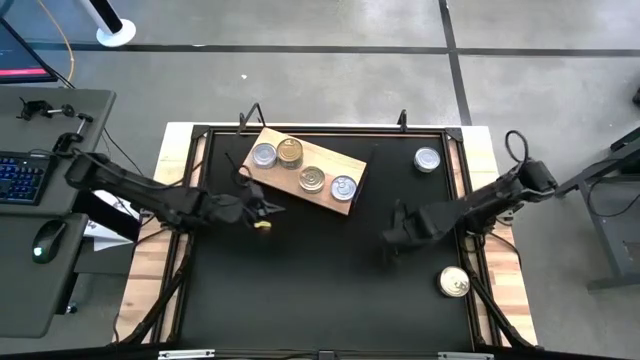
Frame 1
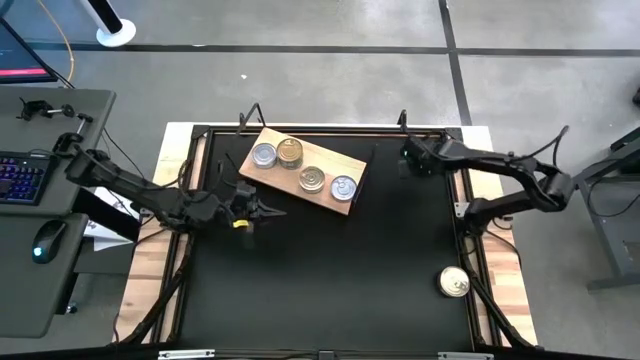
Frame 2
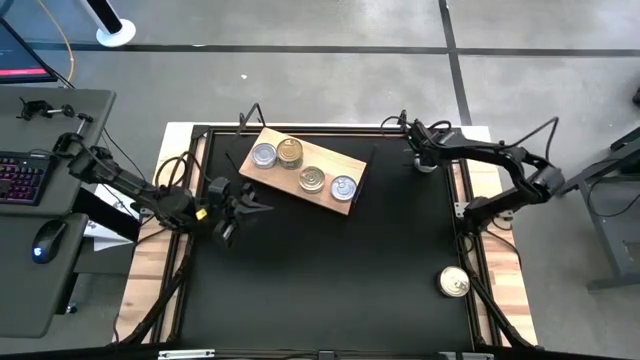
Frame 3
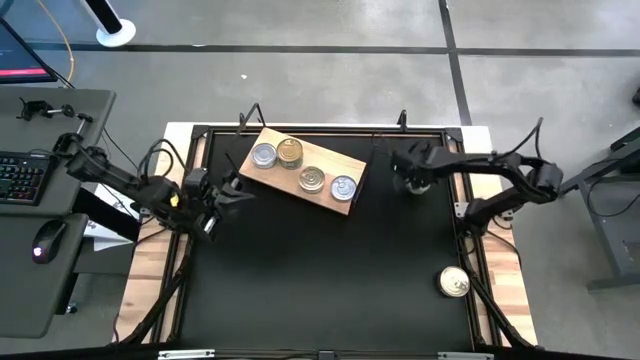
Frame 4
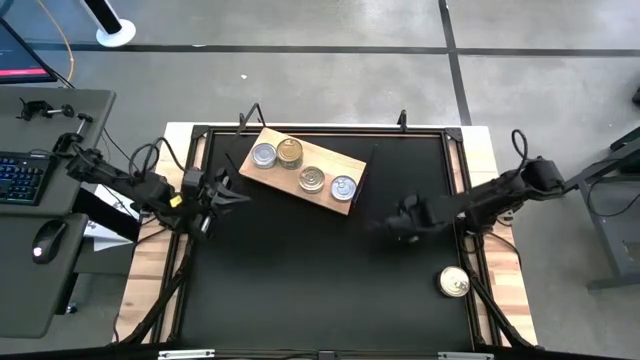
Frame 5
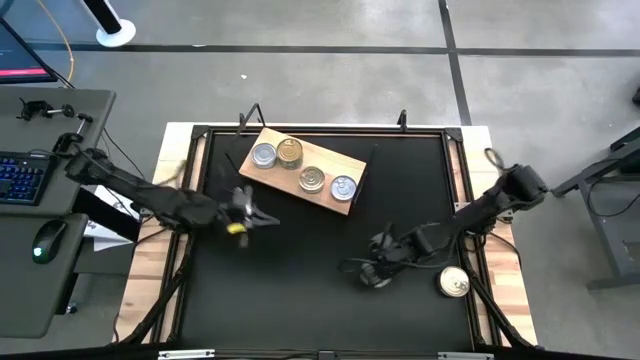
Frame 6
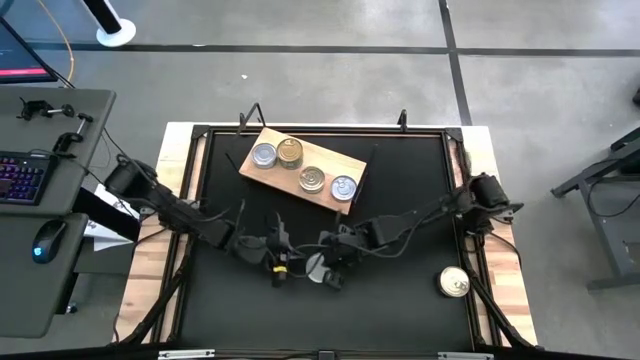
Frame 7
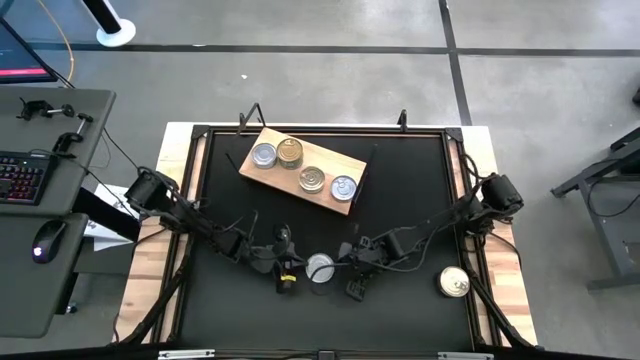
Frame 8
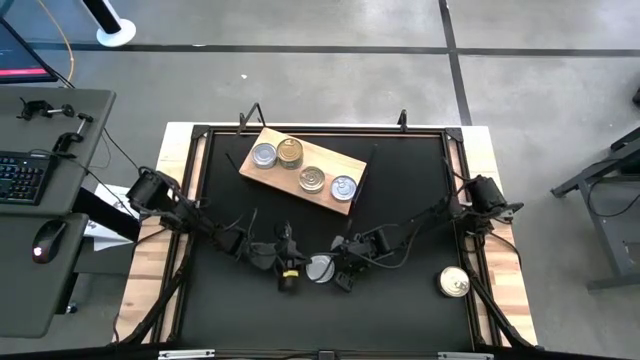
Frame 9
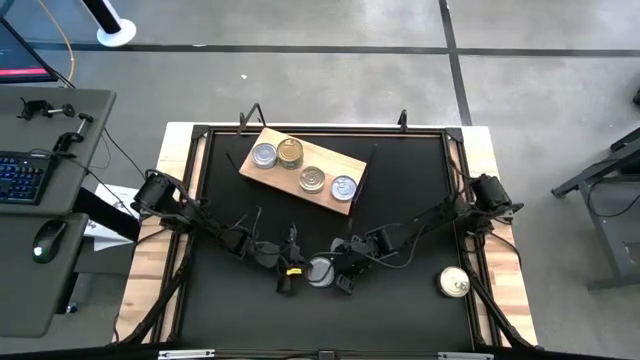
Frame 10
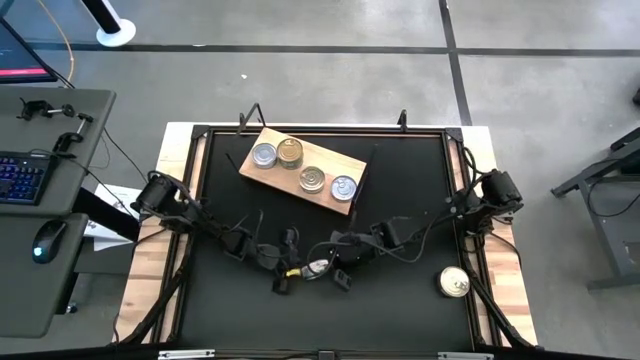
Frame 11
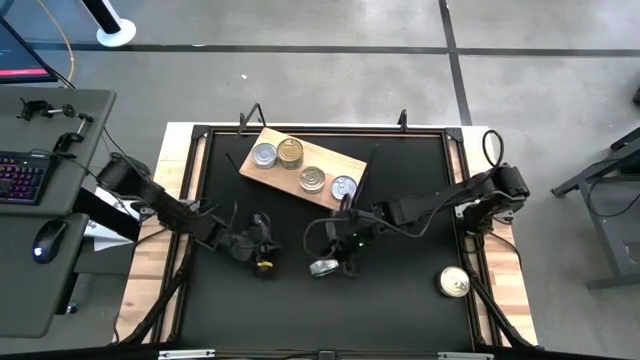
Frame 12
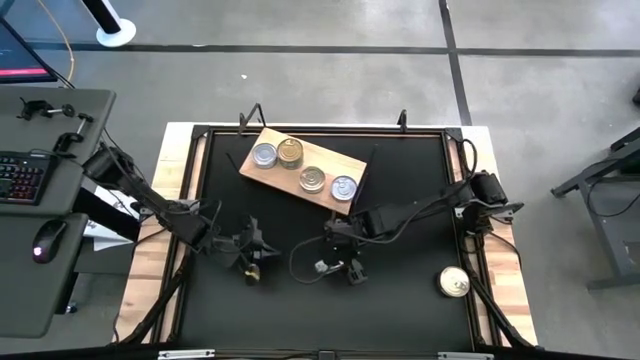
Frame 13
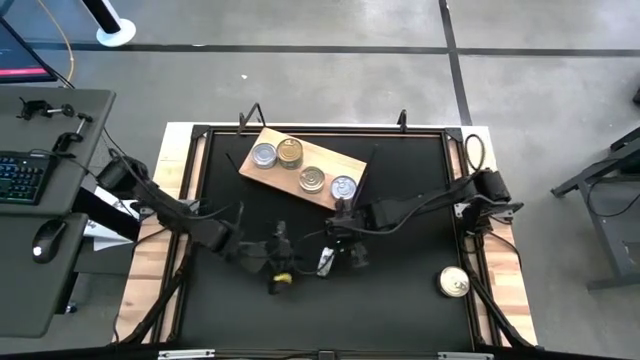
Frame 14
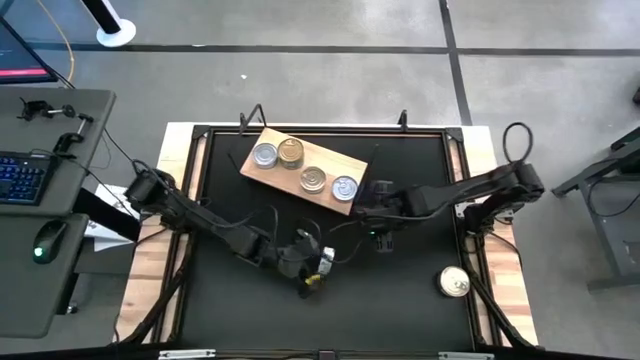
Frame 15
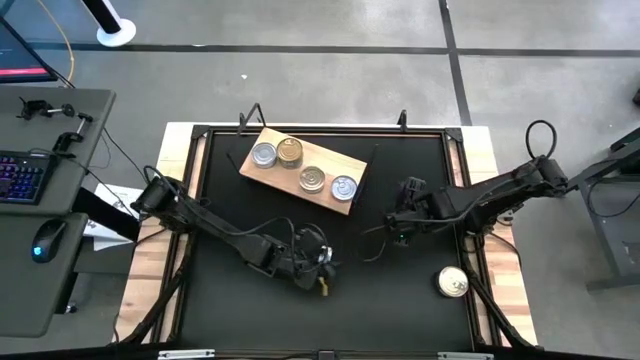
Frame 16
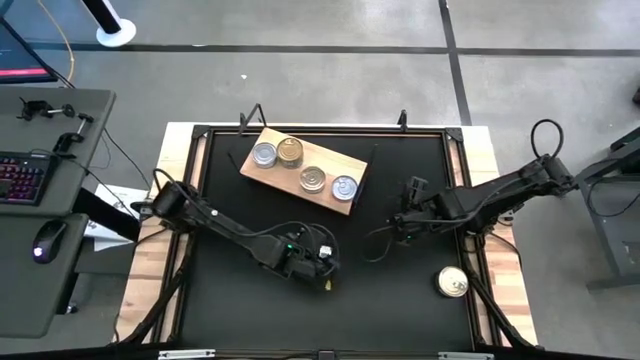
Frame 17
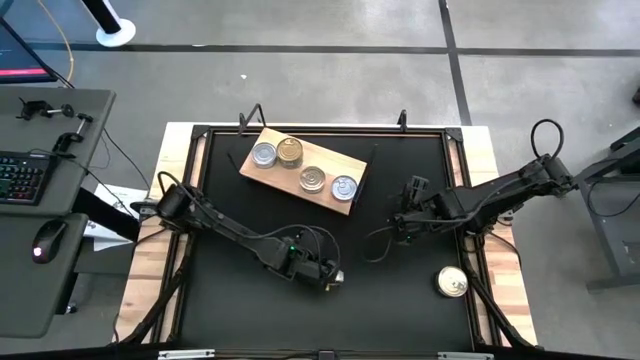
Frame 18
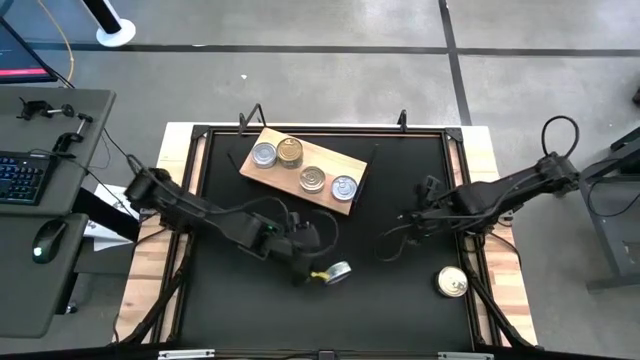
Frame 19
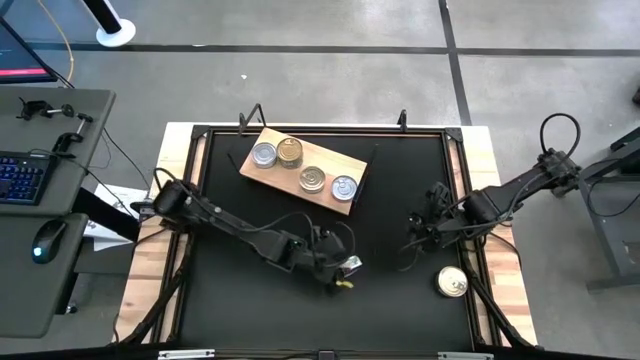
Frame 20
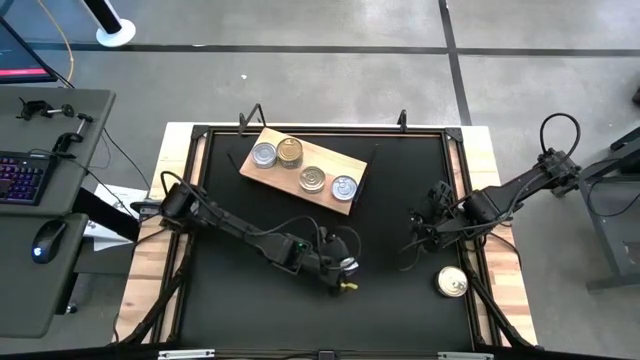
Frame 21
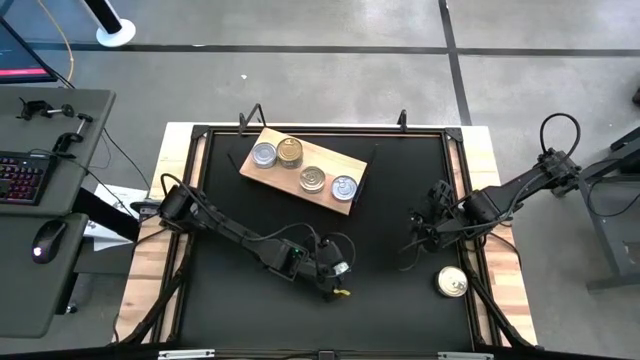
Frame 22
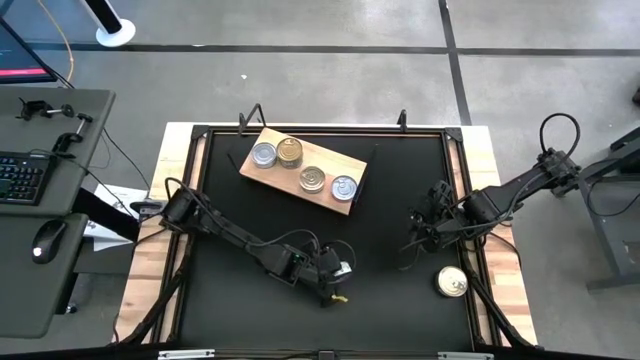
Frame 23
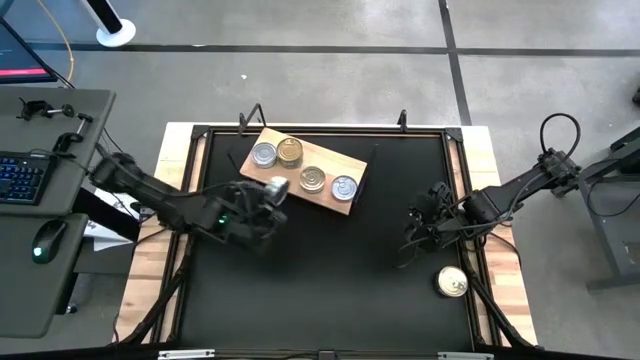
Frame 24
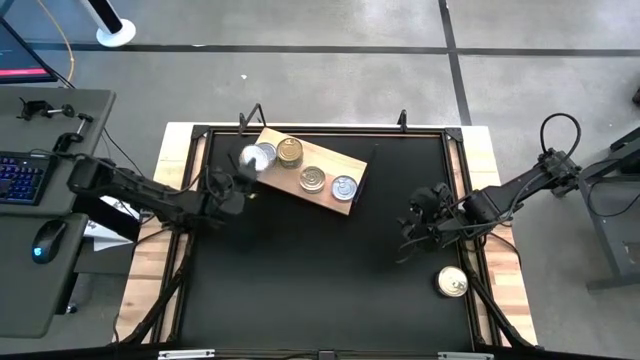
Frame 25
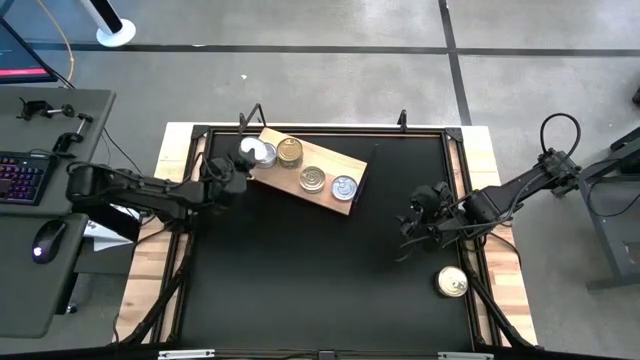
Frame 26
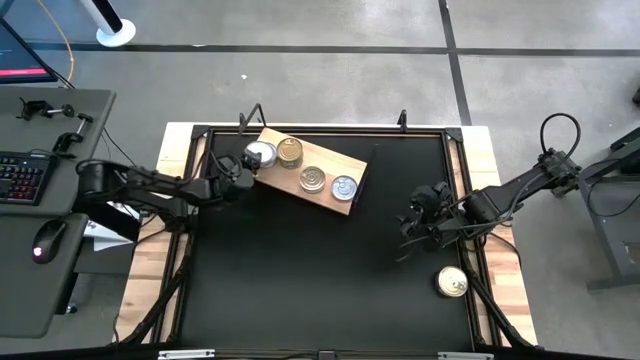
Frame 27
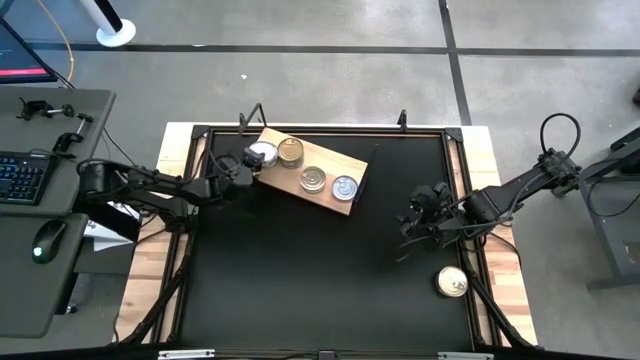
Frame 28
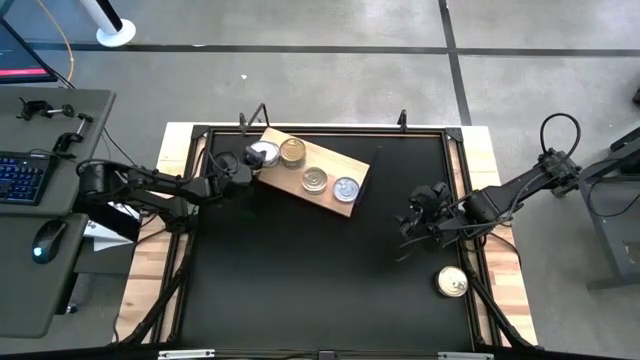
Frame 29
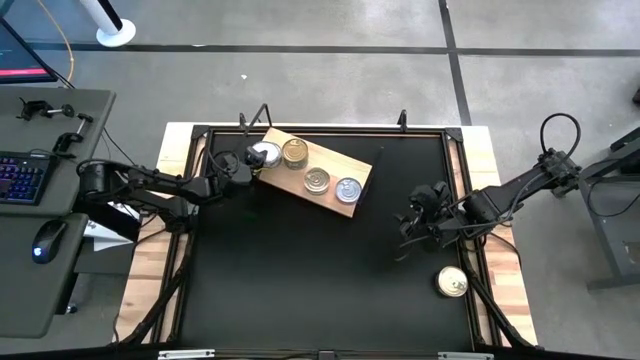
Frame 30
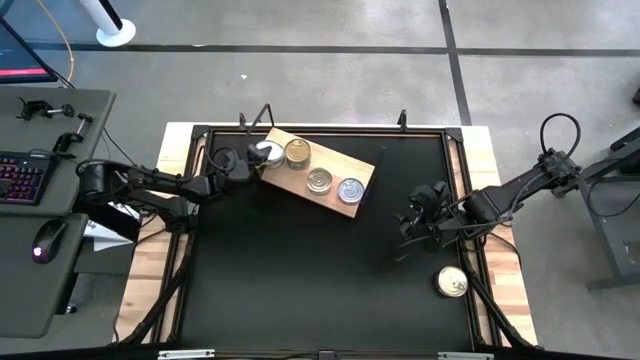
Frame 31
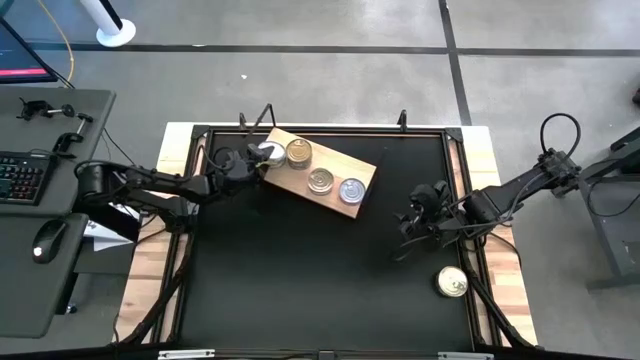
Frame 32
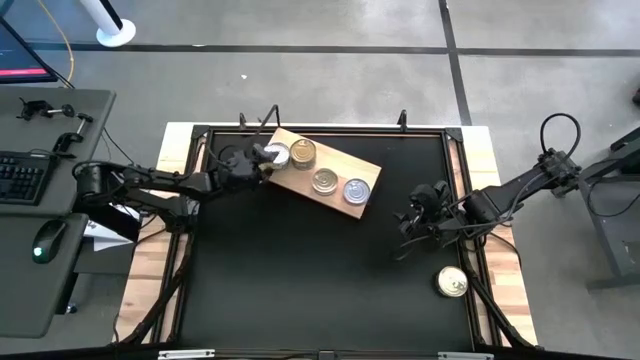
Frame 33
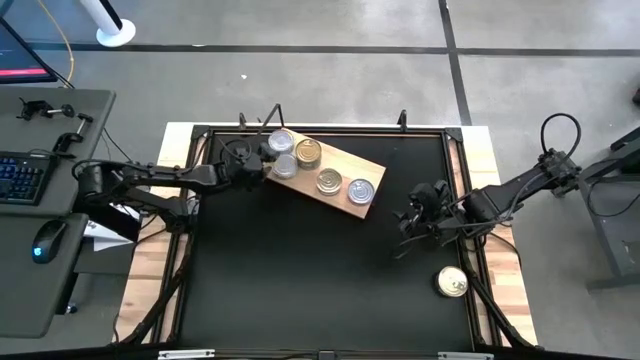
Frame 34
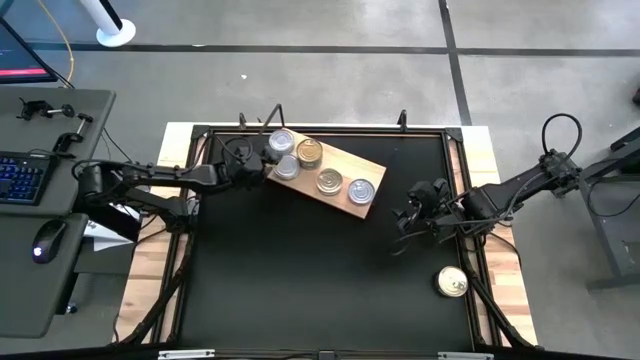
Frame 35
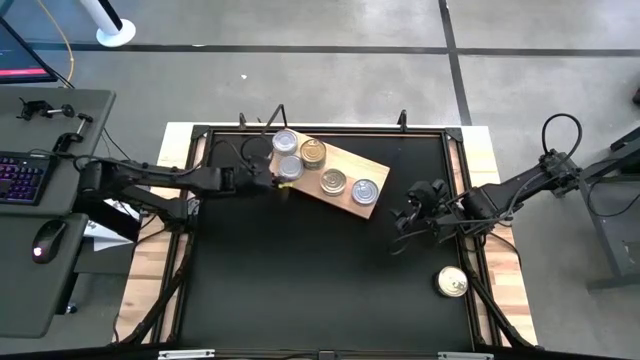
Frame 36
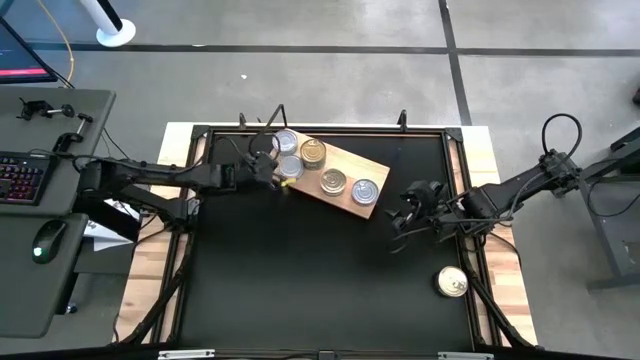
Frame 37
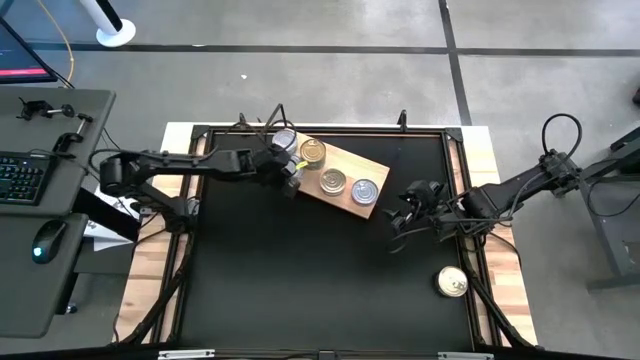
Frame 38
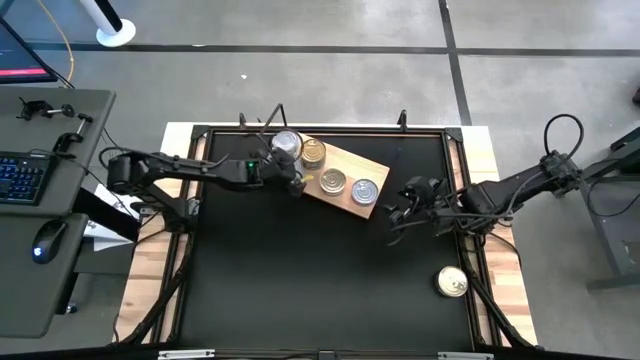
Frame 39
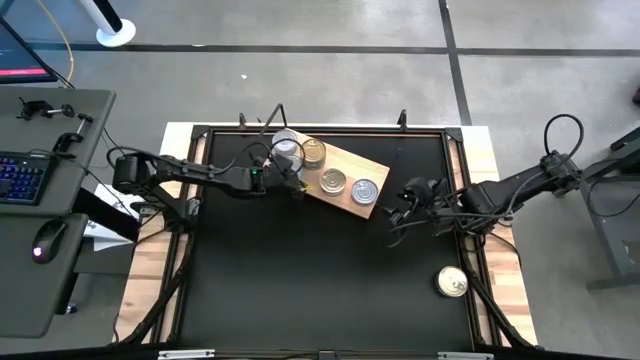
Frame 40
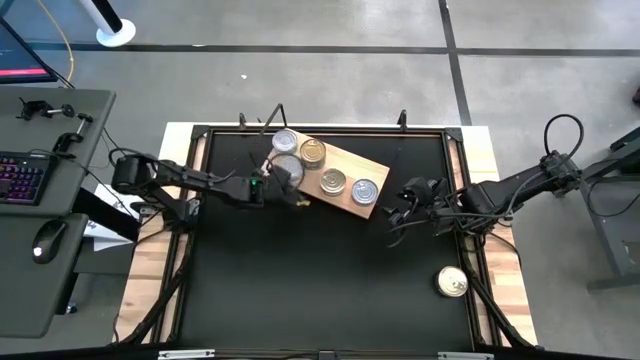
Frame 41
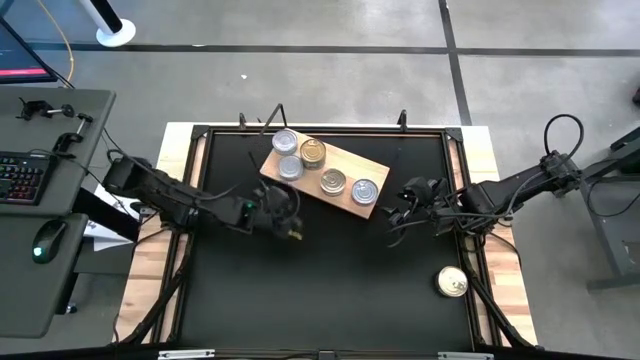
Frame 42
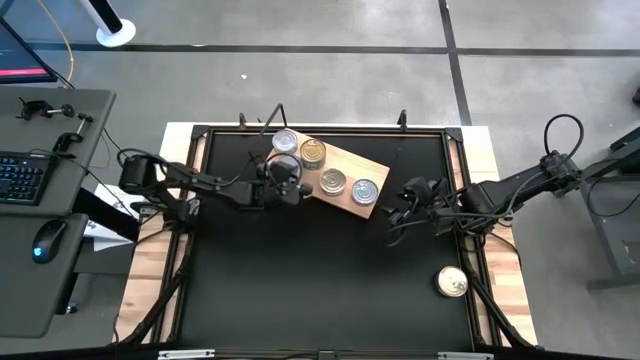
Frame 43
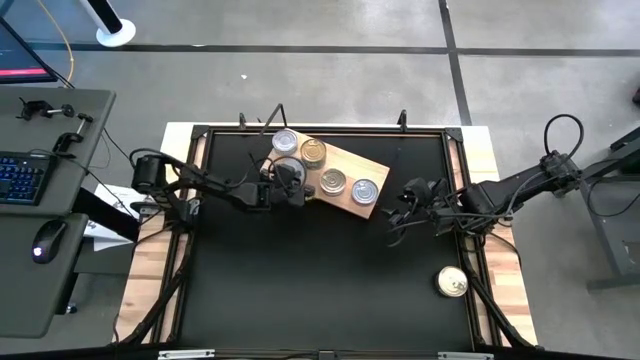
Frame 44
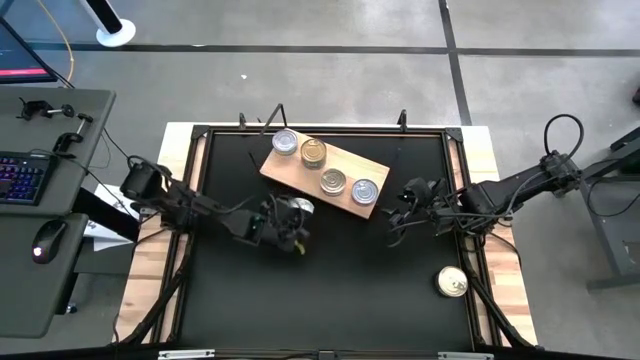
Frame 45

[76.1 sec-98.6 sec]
Task: Stack canned seafood by type on shelf
Stack the green tuna can on top of the other green tuna can on the shelf
